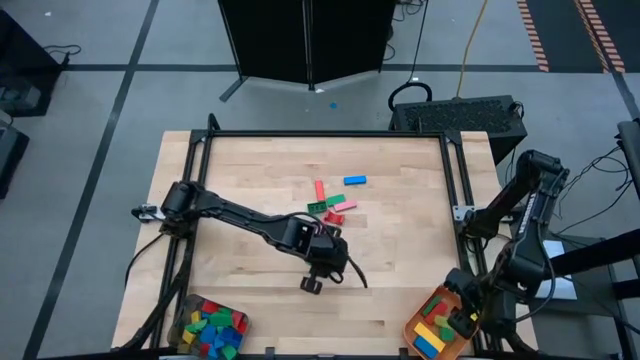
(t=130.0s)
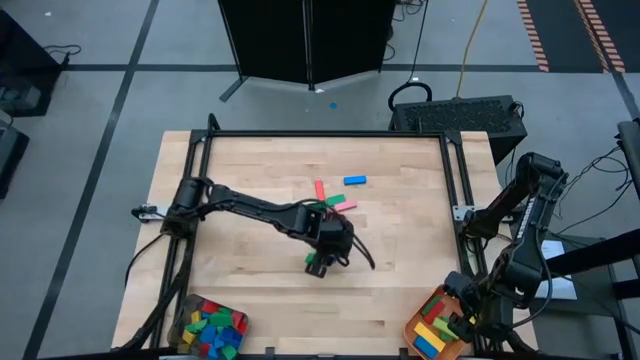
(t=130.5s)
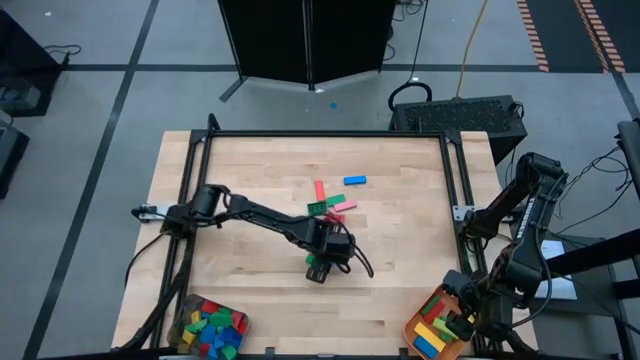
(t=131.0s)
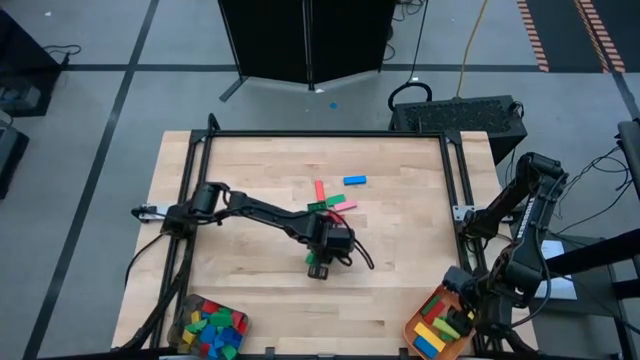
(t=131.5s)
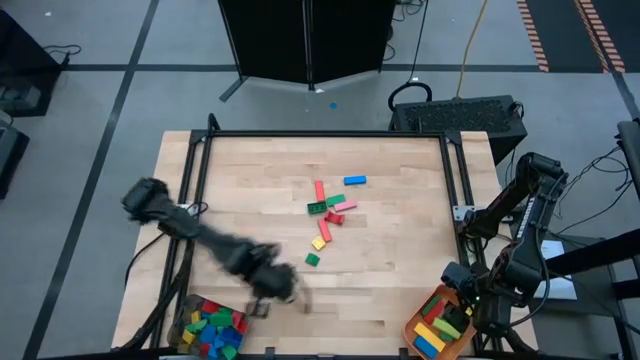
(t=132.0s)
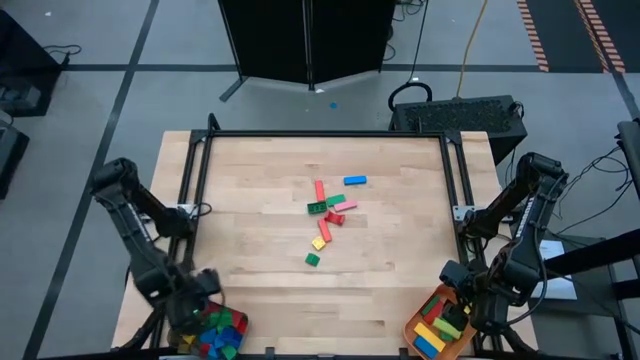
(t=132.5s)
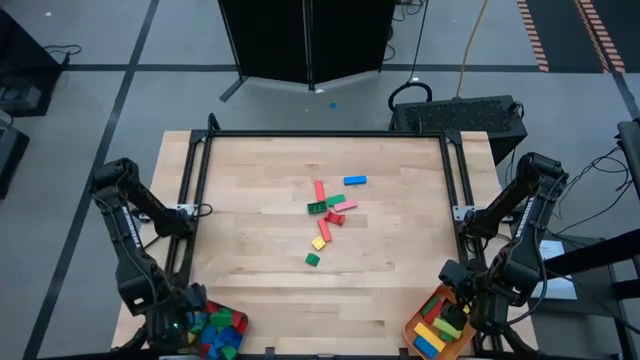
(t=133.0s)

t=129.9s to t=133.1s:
Task: Sort blocks by size
Put the blue semicircle puzzle block into the black bin

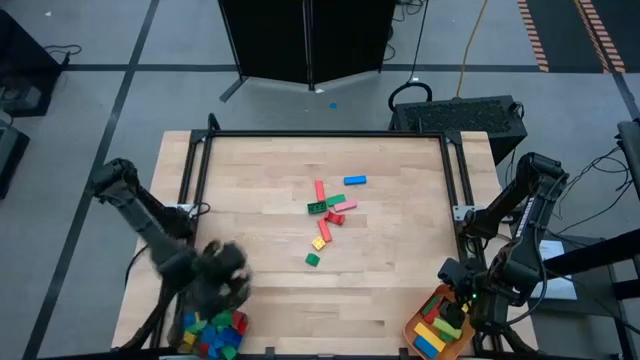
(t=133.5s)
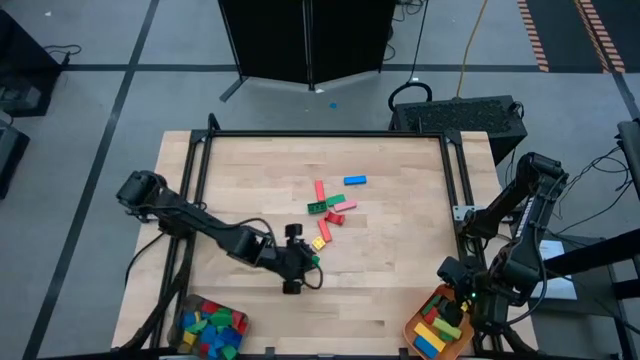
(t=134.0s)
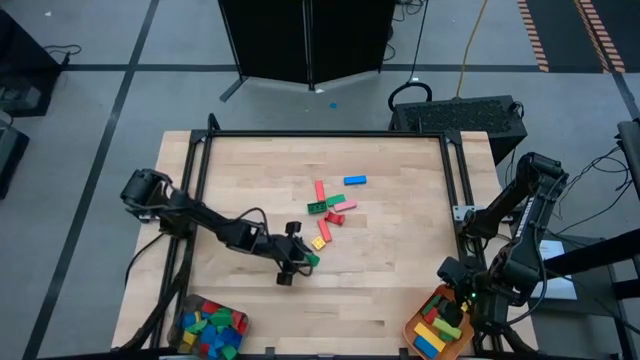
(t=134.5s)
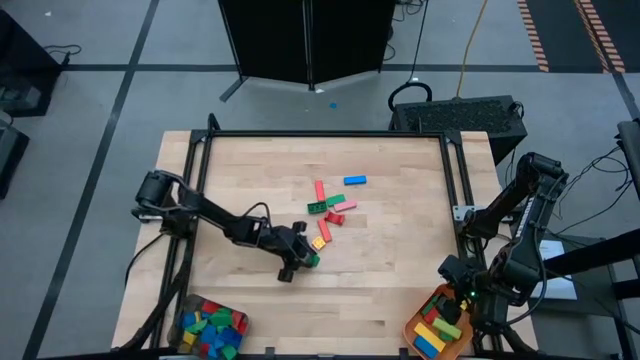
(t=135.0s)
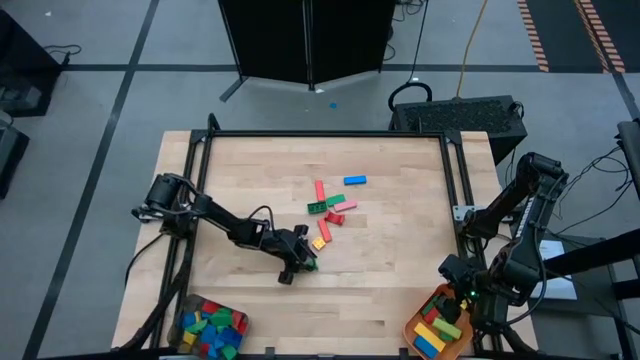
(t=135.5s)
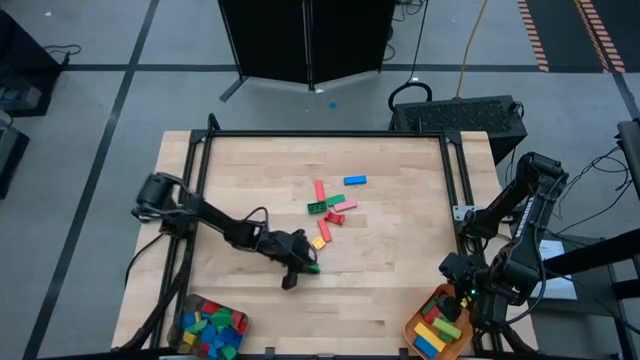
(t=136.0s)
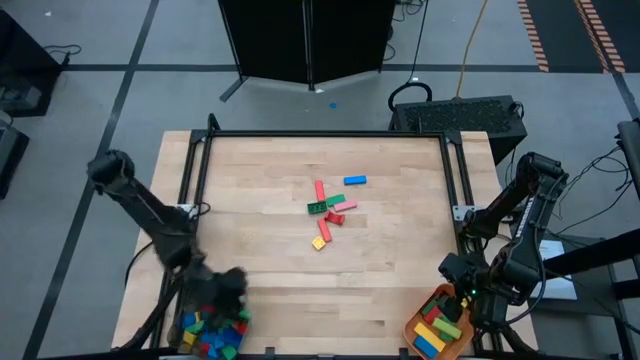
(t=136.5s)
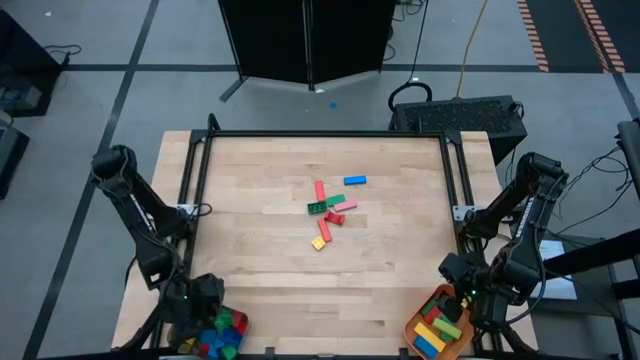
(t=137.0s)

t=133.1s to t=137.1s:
Put the green triangular block into the black bin

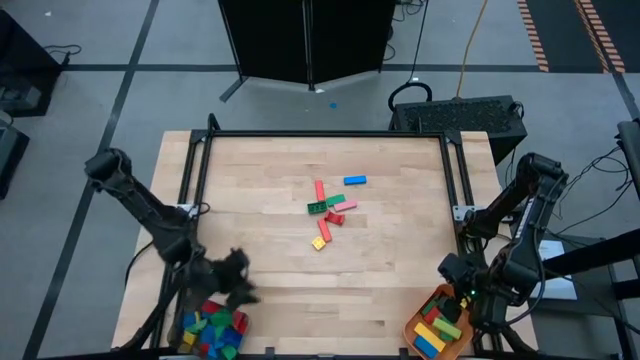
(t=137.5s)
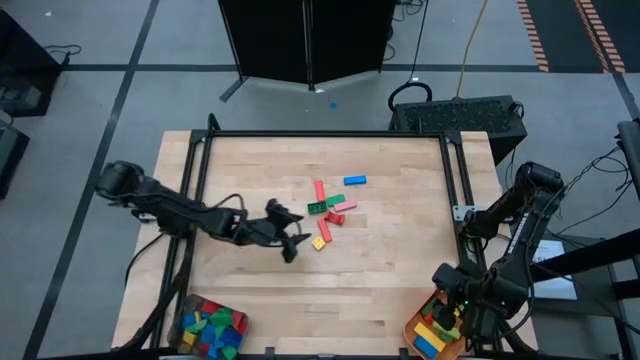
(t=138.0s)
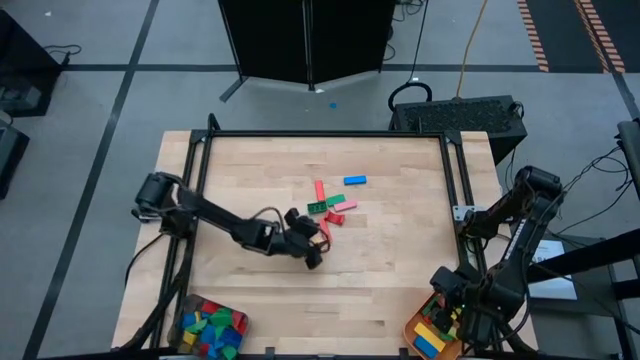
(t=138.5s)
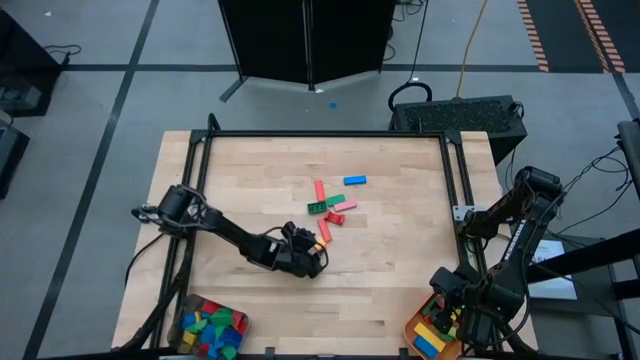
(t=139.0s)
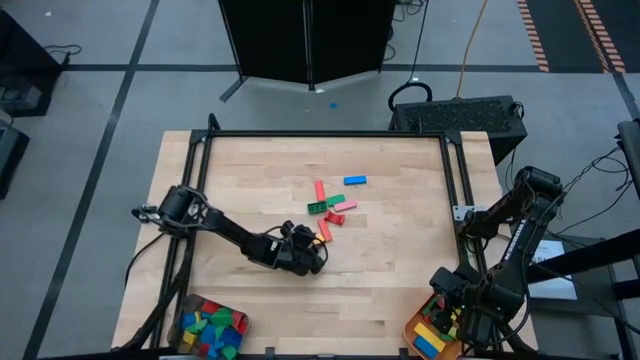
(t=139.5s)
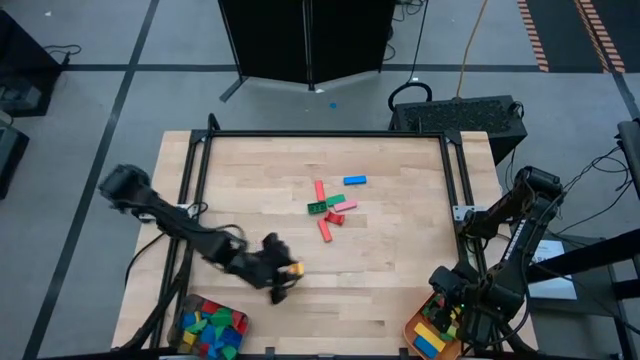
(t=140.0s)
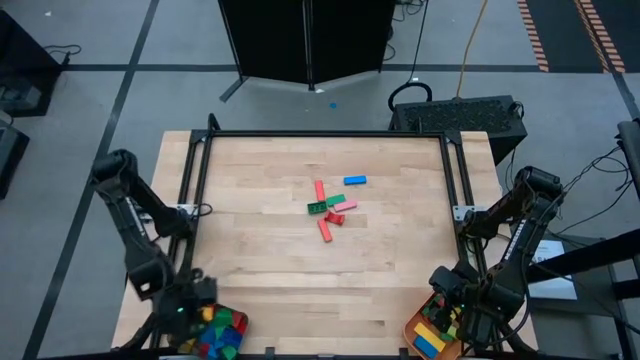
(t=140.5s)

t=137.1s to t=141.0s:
Put the yellow square game piece into the black bin

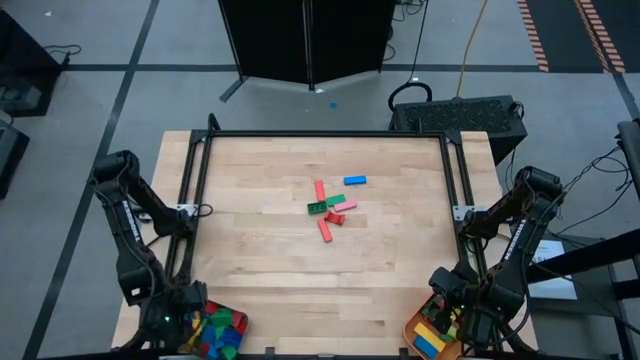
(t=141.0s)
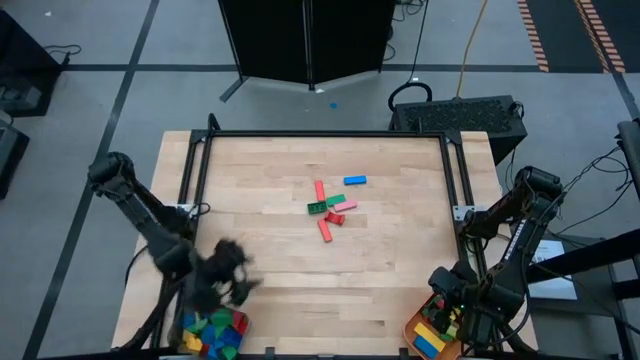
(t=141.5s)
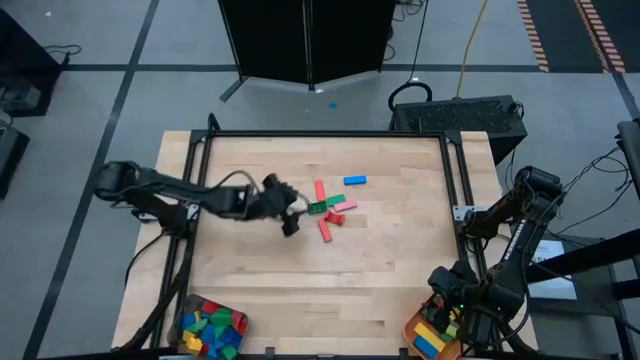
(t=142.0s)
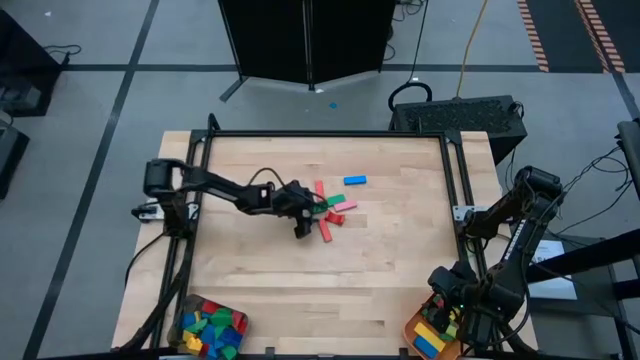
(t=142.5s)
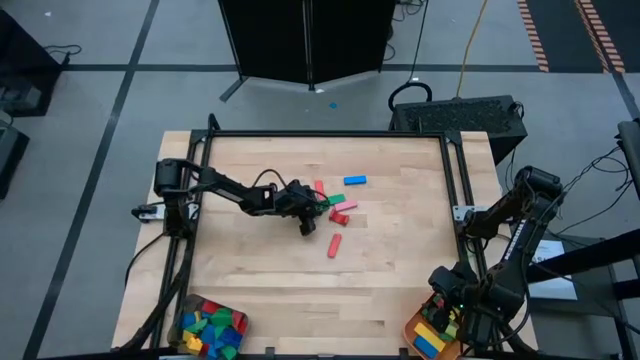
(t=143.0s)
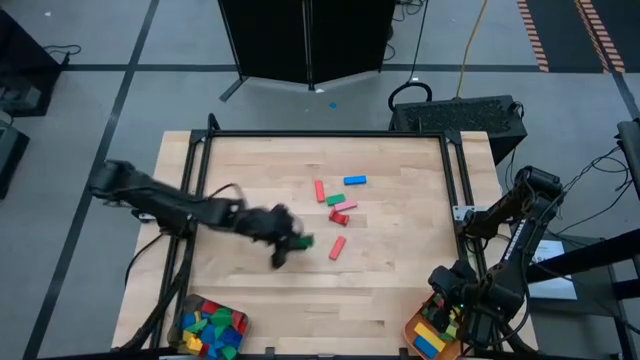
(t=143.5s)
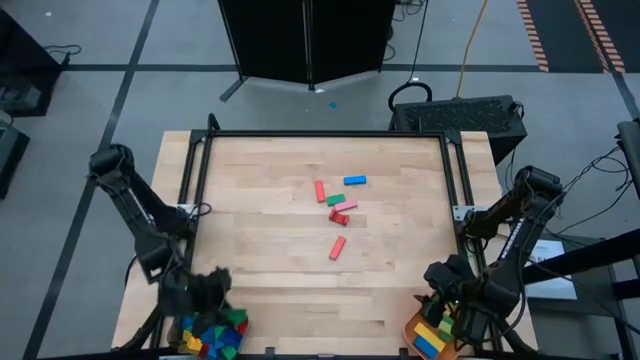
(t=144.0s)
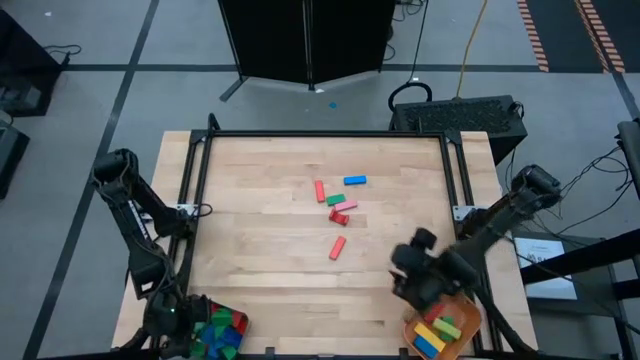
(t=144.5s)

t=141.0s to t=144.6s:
Put the green semicircle game piece into the black bin

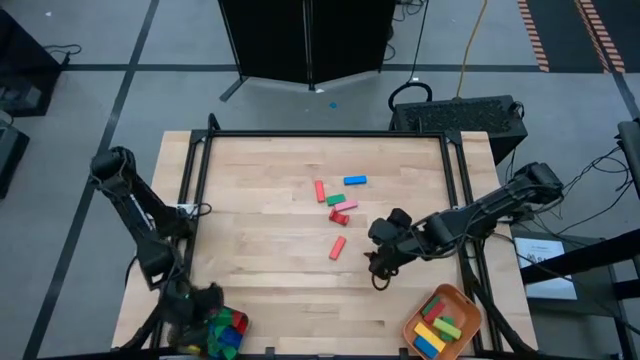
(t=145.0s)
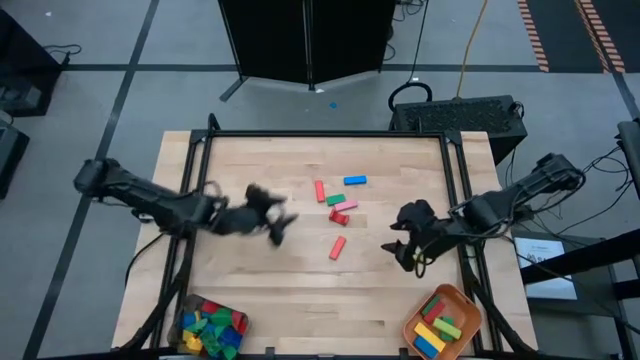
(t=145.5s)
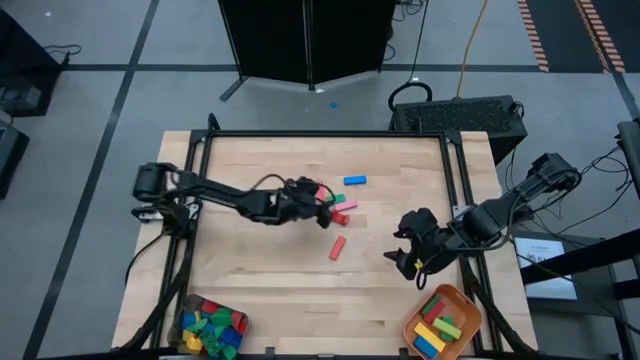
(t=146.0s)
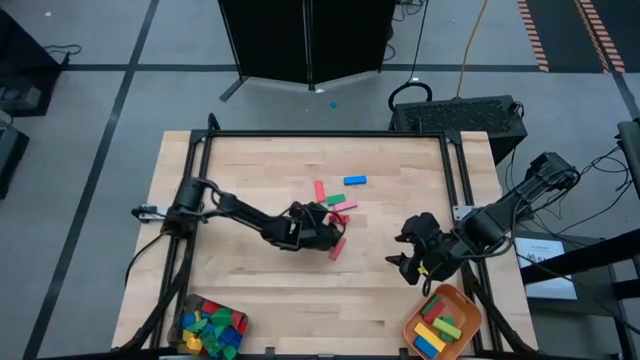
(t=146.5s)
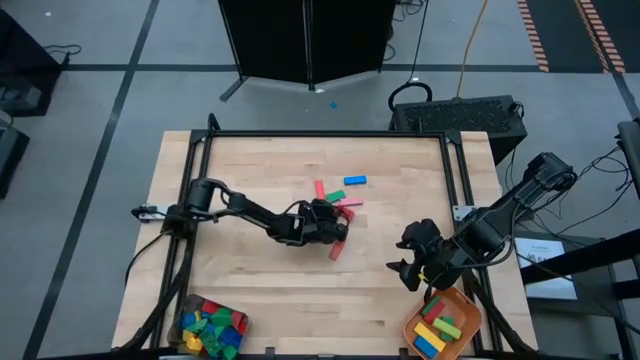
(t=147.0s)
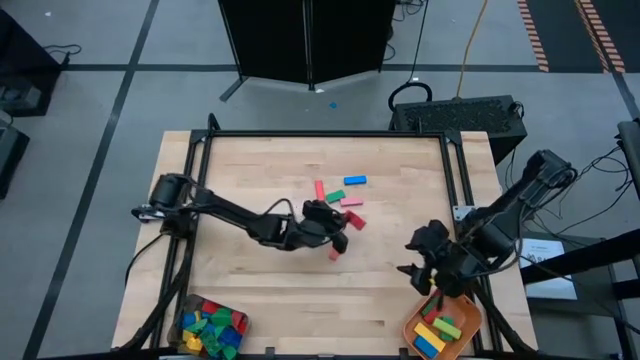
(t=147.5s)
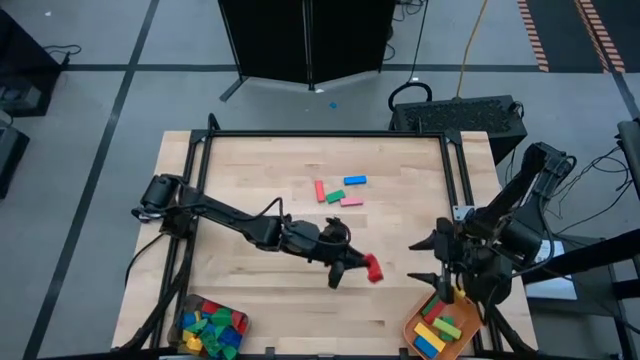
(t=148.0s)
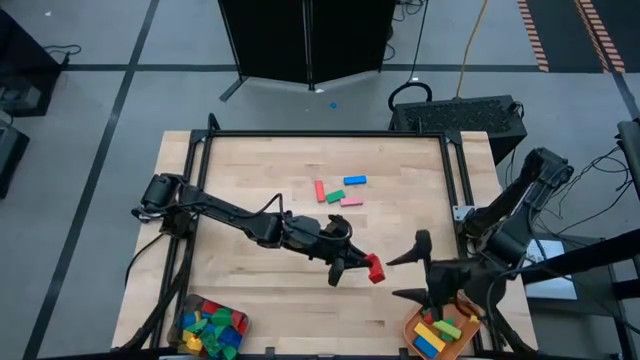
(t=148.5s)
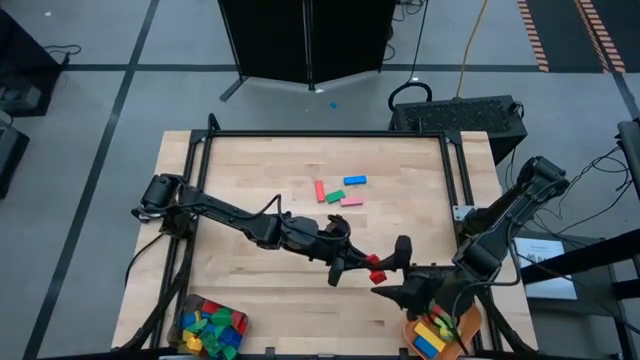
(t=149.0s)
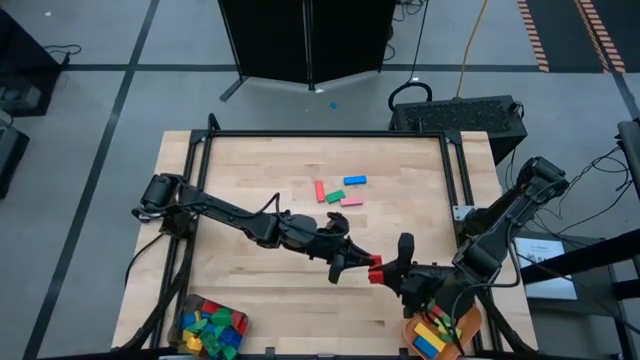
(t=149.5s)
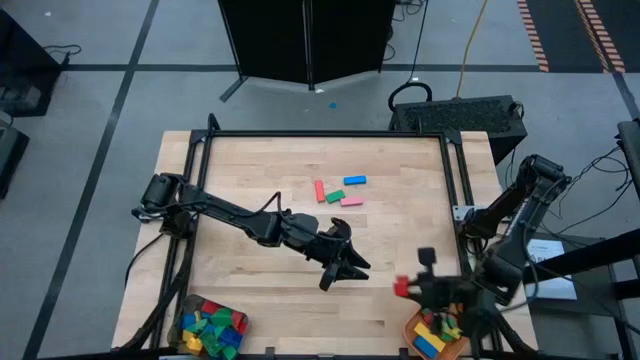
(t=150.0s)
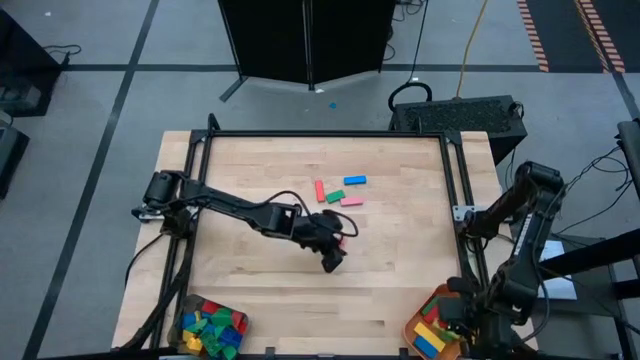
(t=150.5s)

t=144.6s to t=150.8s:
Put the red arch block into the orange bin
